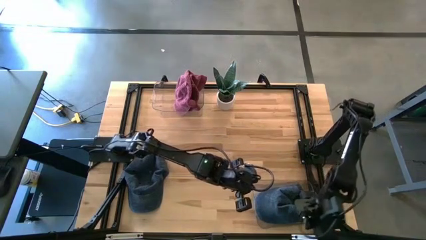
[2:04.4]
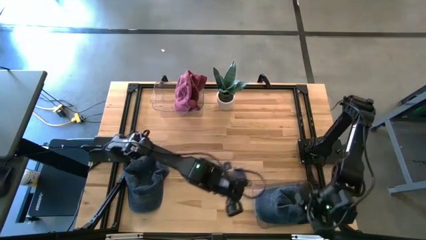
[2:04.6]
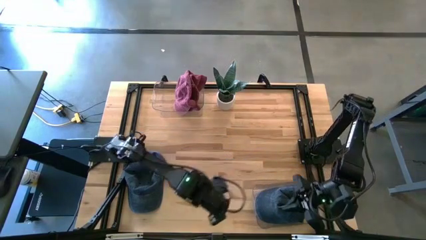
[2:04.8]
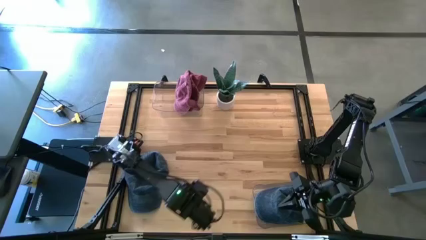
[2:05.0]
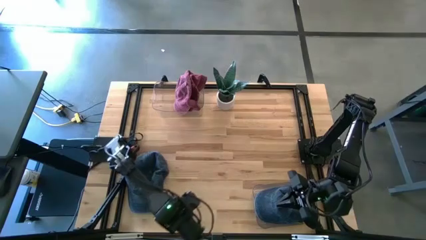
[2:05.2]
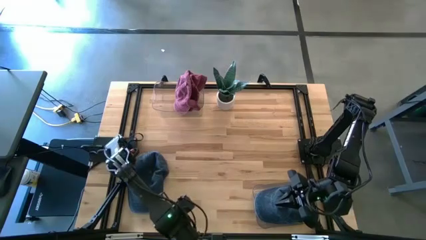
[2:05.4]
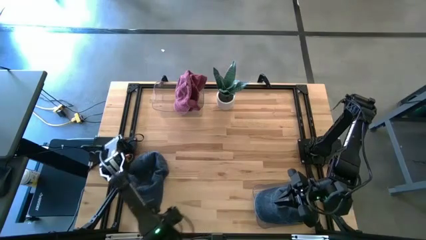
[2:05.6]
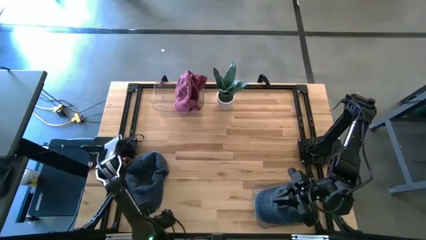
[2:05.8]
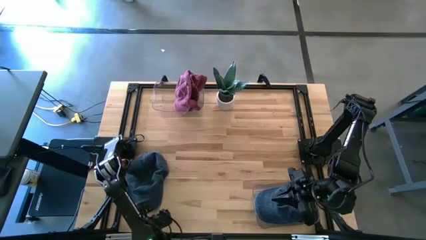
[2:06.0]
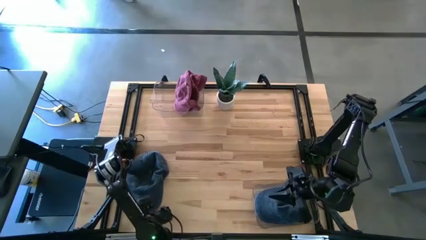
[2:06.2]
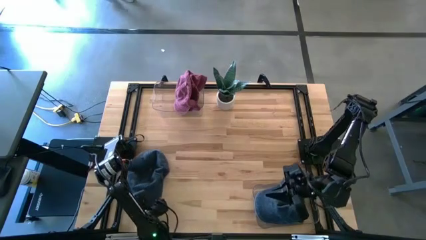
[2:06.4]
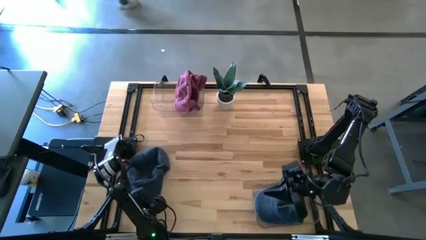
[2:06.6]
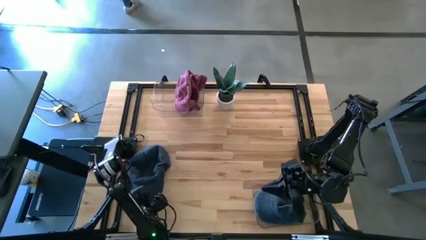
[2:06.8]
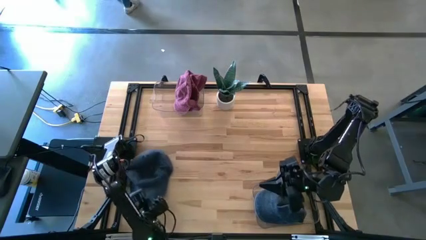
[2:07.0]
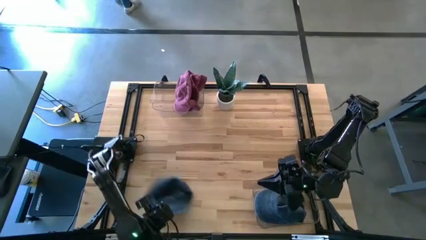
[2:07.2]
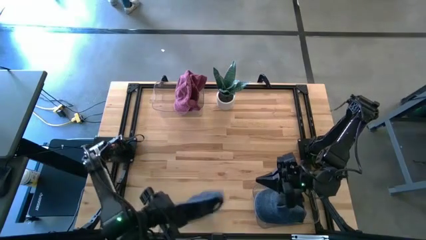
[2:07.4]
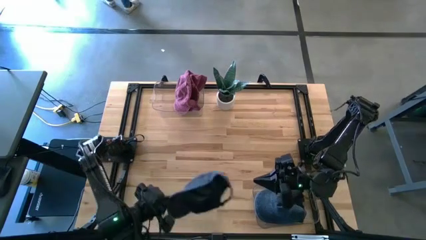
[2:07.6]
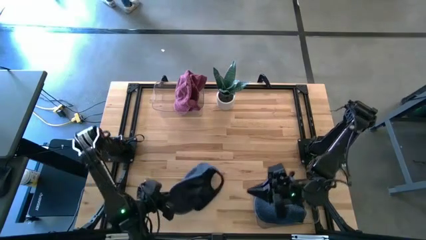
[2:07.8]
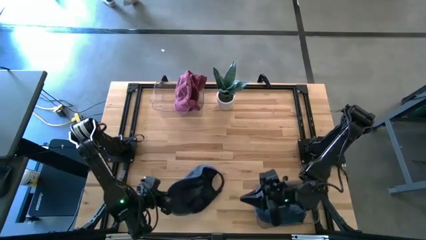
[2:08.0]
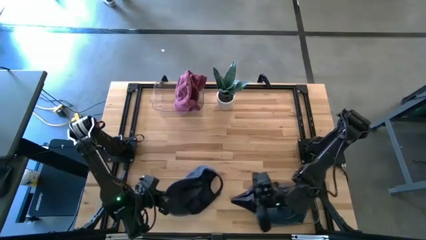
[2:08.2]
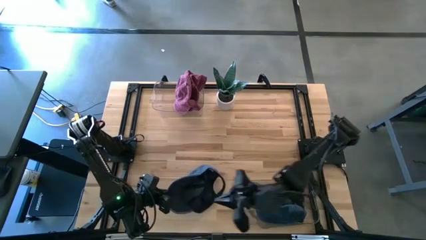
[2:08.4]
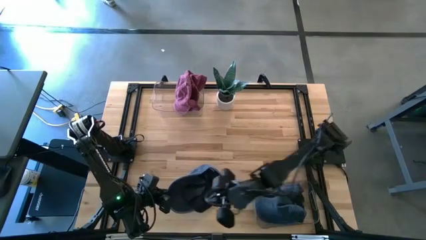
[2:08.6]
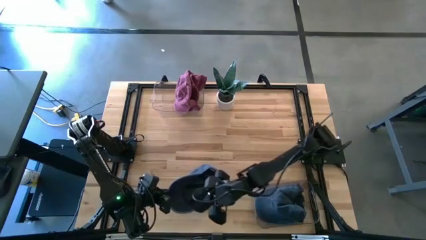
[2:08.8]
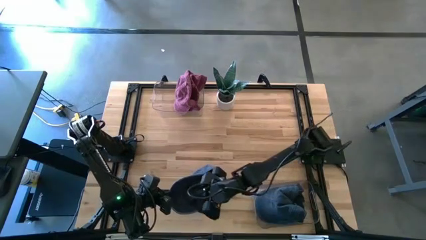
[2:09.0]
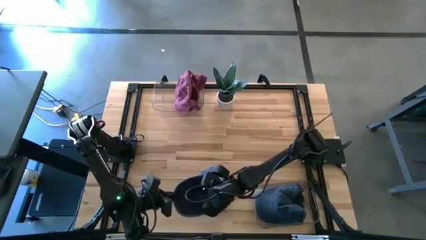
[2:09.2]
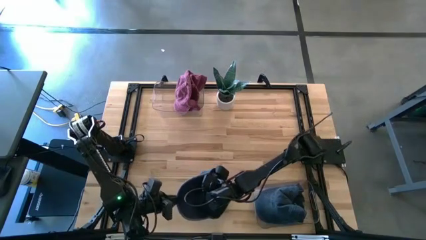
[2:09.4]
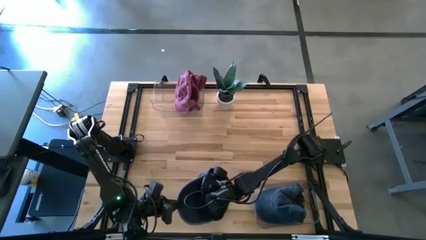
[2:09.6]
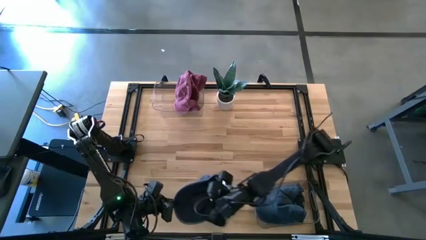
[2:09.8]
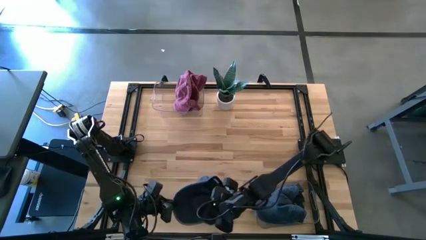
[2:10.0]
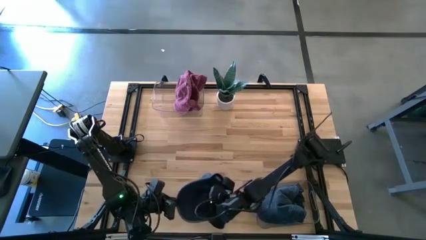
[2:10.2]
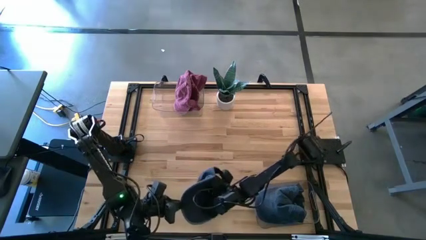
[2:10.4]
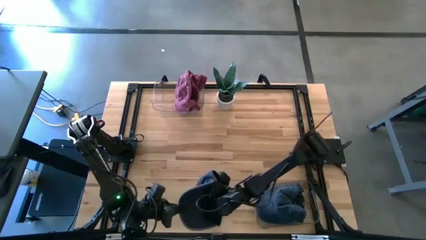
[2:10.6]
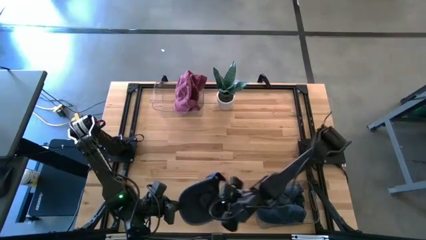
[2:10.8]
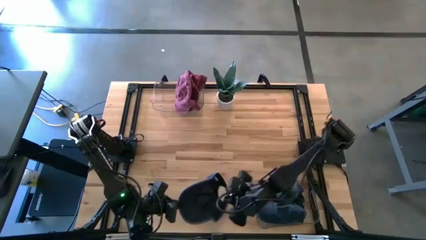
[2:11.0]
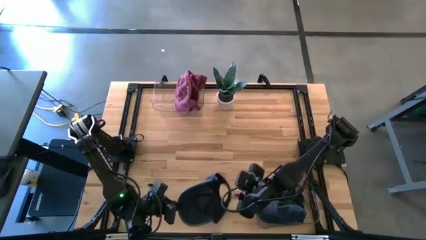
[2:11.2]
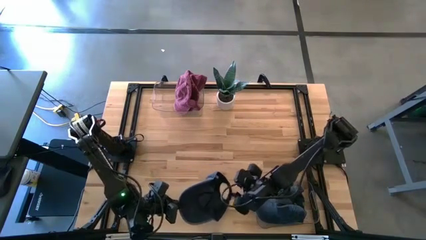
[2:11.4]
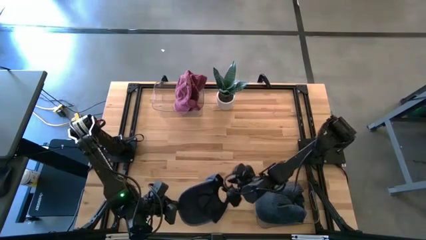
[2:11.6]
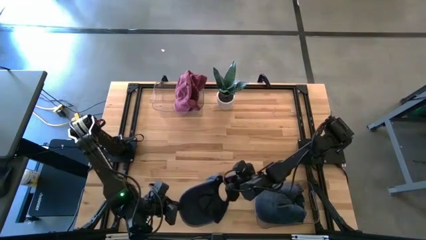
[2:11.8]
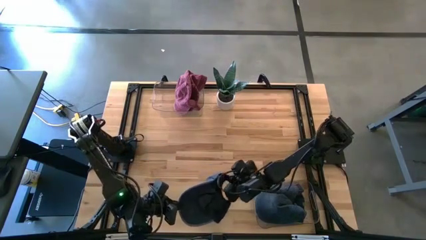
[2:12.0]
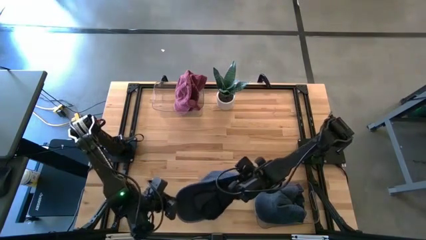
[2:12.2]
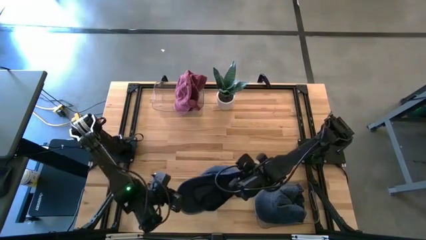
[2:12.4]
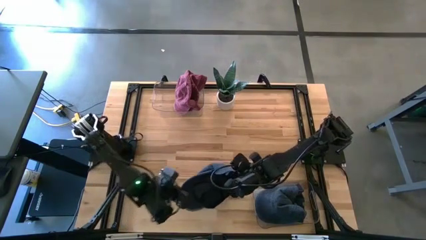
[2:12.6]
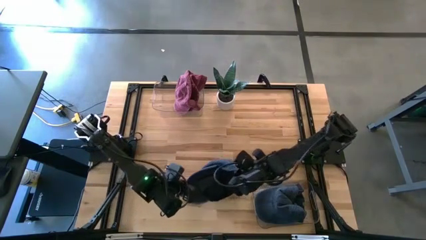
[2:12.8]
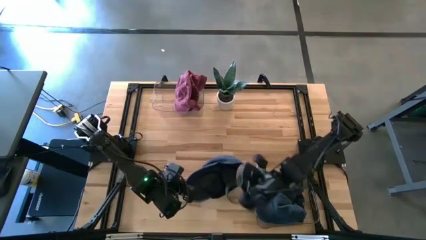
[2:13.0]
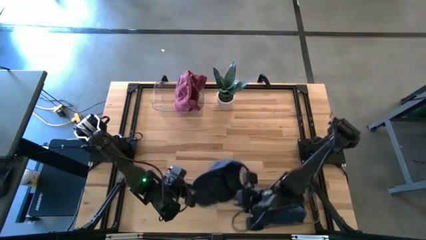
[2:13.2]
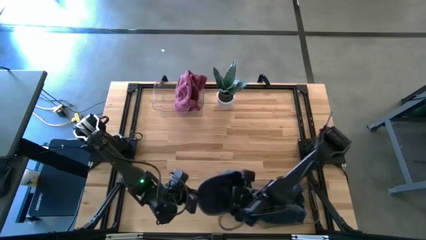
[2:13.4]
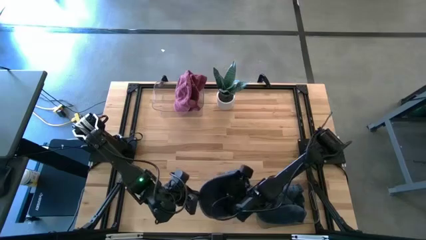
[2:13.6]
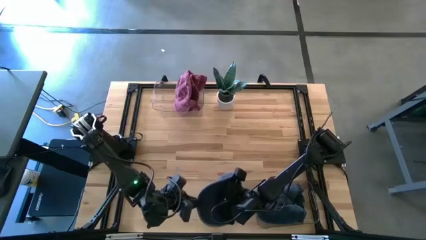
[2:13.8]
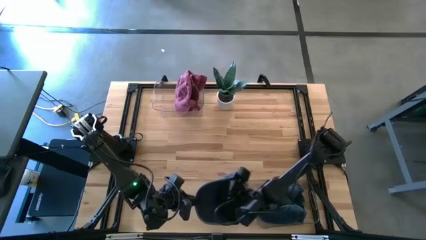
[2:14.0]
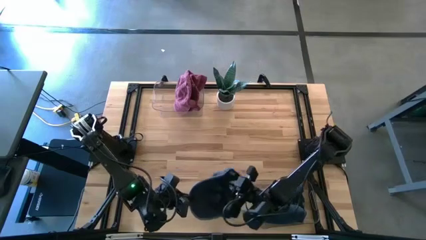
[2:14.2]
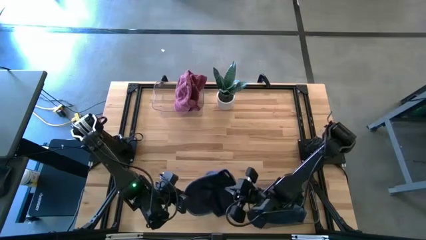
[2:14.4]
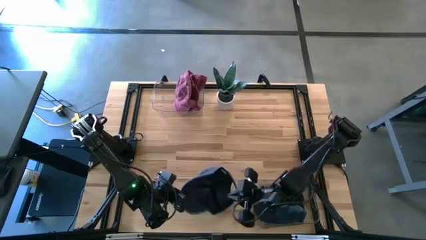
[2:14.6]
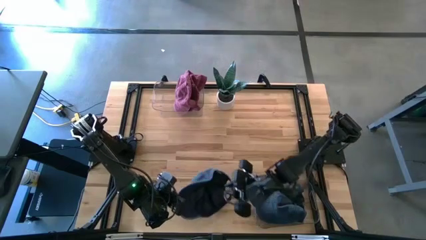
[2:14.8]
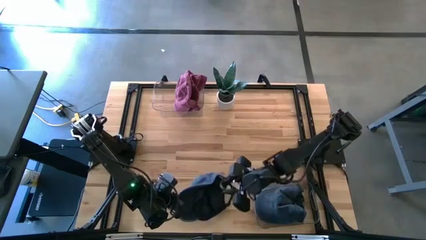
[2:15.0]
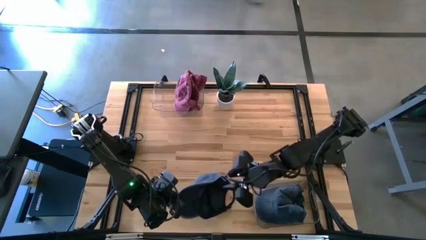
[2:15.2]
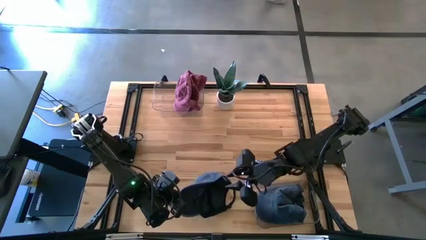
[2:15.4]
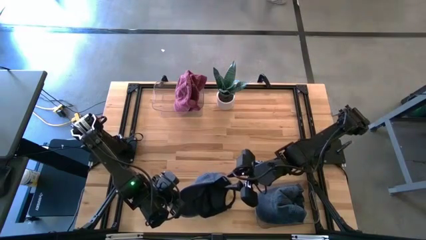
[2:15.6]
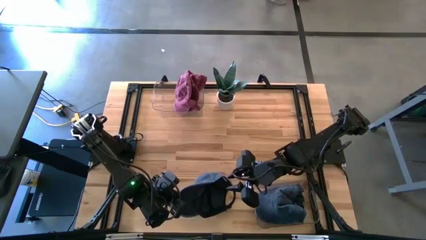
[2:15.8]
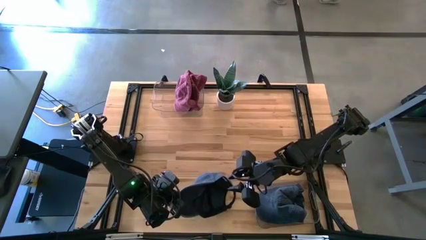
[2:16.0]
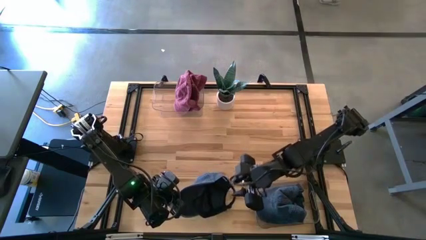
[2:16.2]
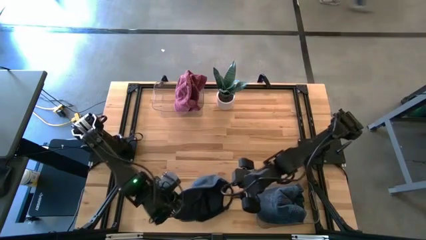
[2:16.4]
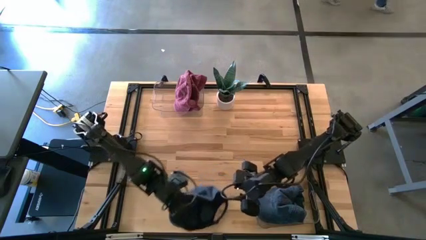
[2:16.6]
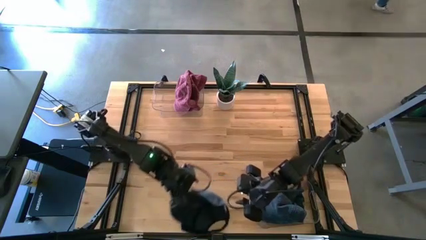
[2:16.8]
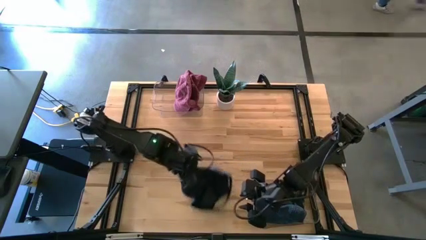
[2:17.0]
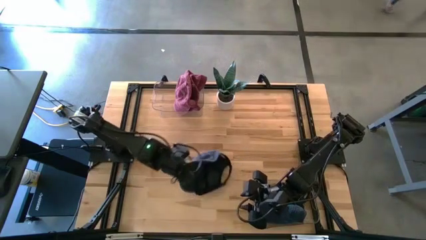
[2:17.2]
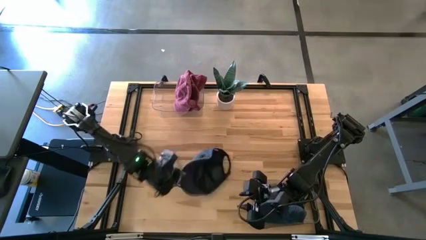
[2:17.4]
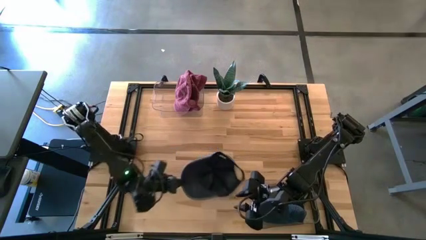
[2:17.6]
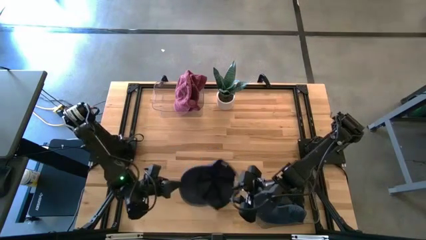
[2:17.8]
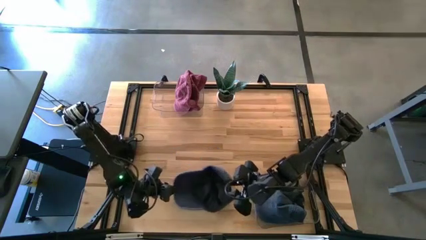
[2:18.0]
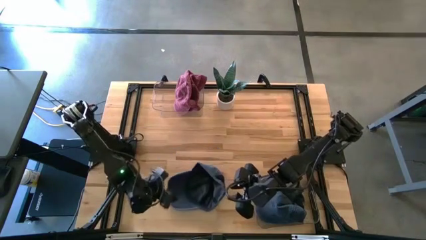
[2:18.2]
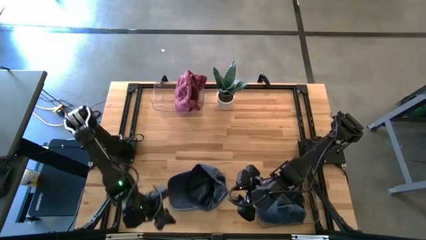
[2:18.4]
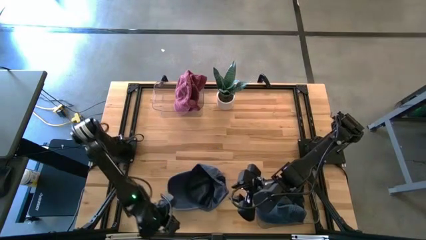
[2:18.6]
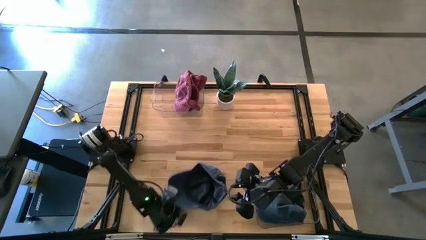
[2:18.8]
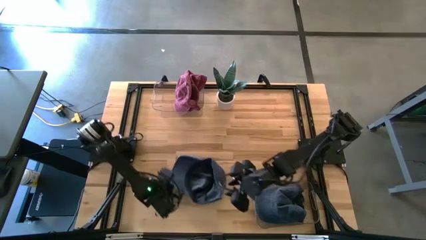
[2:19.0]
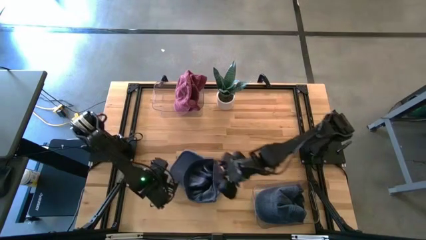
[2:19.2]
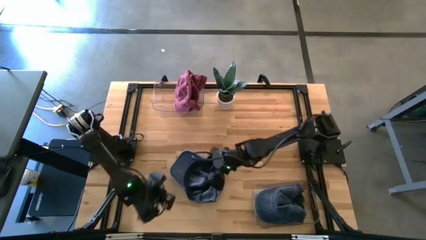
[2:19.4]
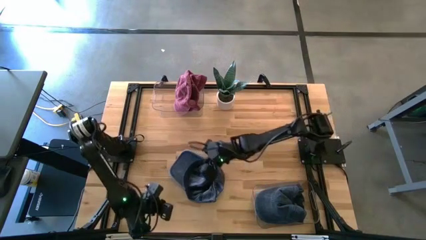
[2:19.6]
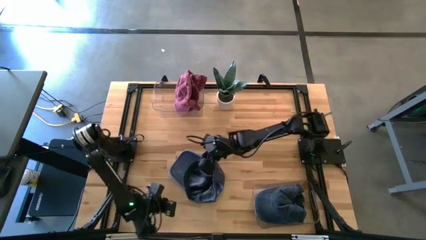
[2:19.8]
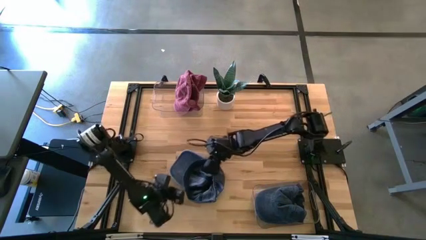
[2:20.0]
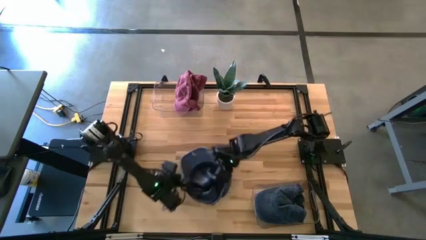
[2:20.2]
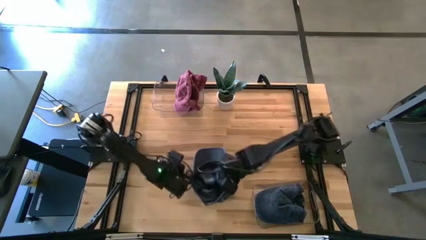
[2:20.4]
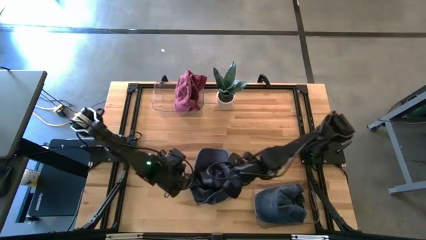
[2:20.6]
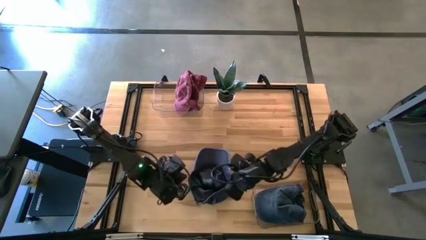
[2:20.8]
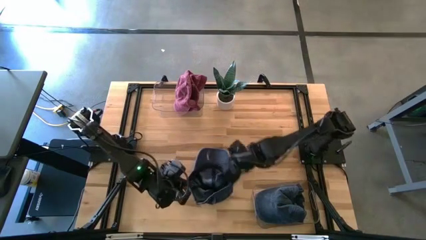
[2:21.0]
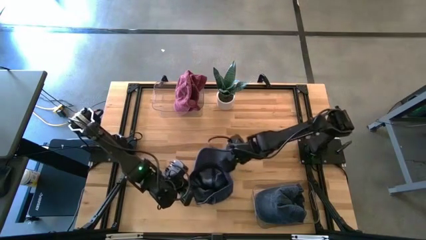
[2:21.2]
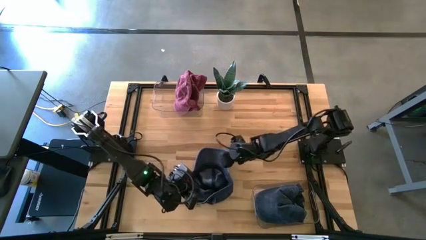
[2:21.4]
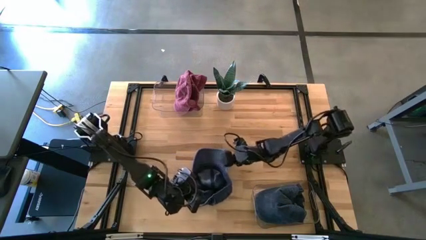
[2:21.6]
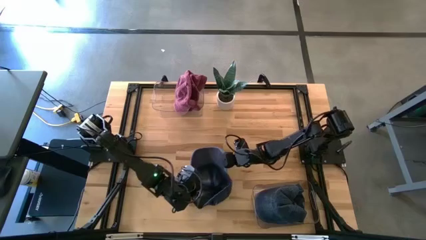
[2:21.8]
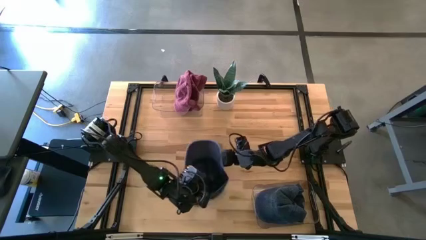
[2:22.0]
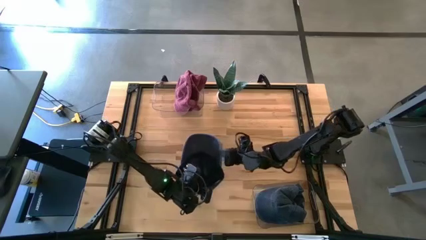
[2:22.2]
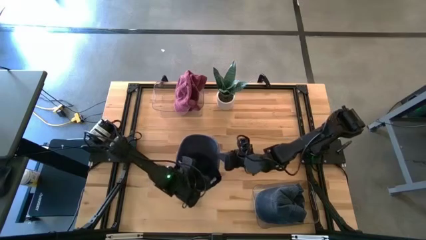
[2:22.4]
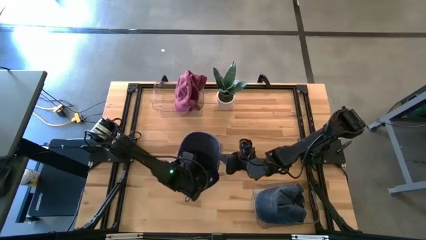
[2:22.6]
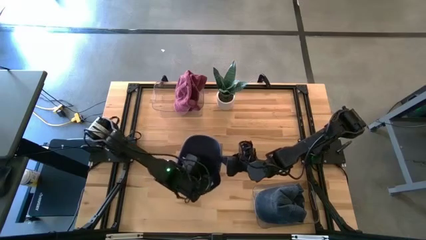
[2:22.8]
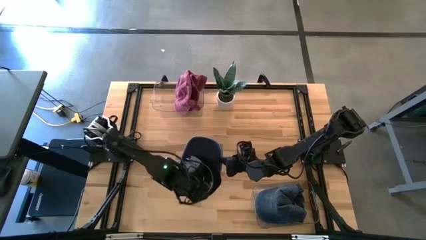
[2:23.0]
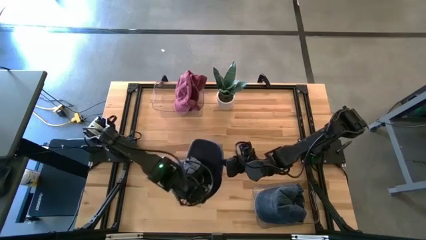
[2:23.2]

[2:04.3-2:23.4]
Task: Pick & Place hat
Put the blue cap into the bottom transparent bin
